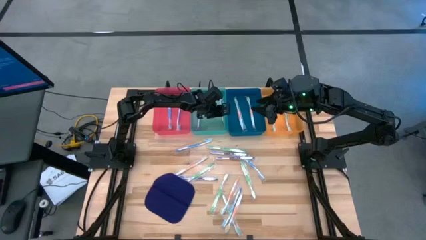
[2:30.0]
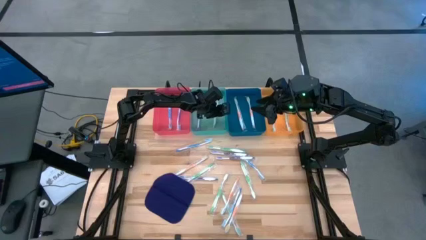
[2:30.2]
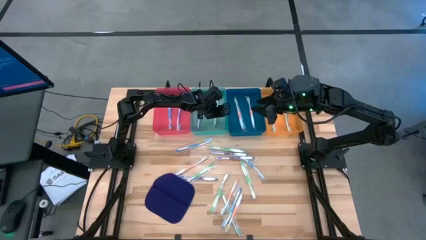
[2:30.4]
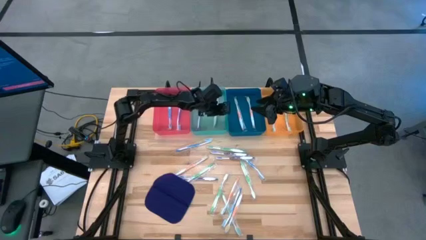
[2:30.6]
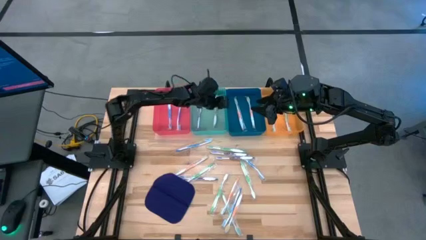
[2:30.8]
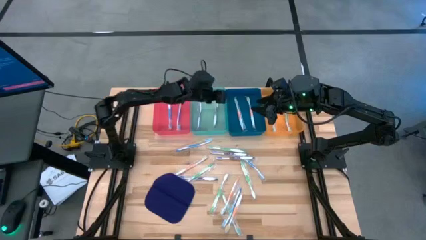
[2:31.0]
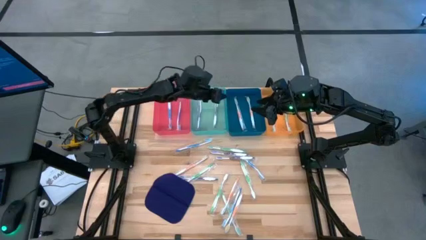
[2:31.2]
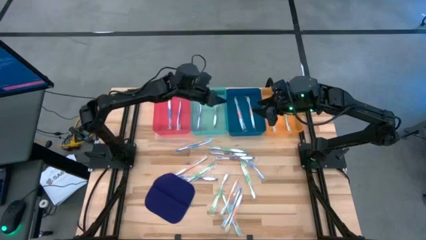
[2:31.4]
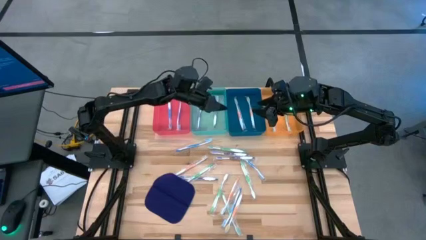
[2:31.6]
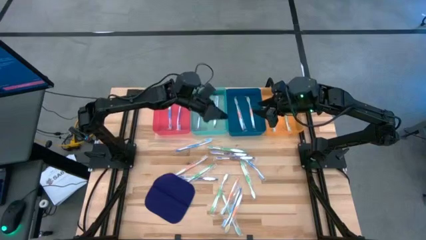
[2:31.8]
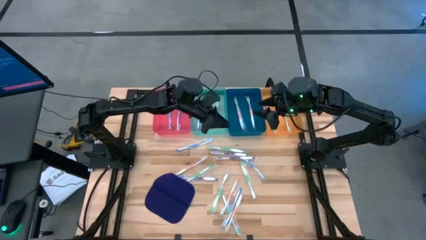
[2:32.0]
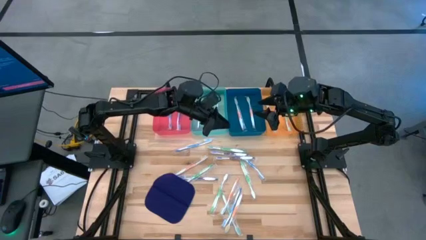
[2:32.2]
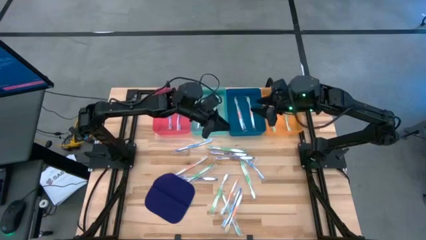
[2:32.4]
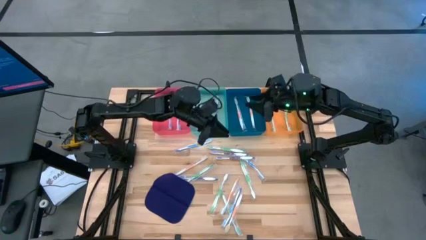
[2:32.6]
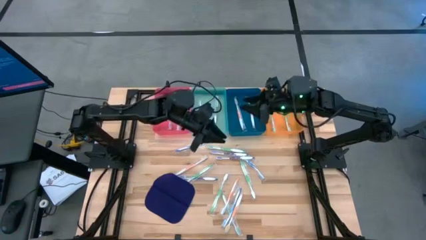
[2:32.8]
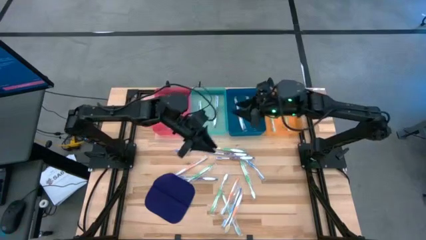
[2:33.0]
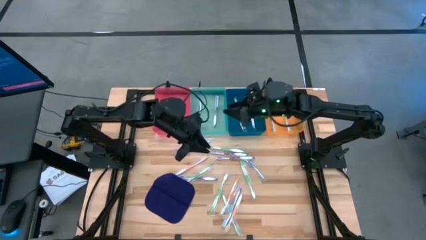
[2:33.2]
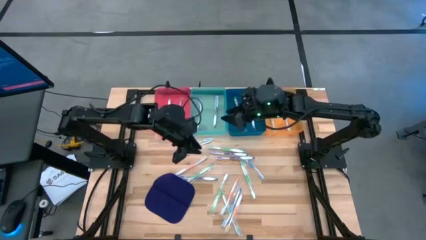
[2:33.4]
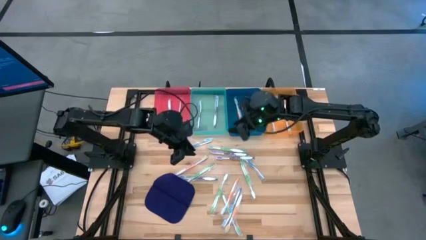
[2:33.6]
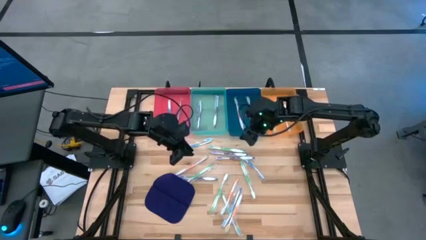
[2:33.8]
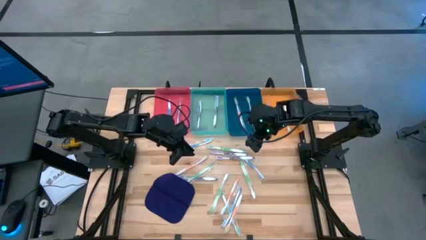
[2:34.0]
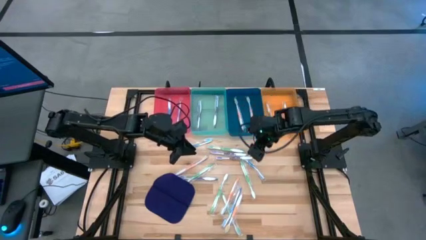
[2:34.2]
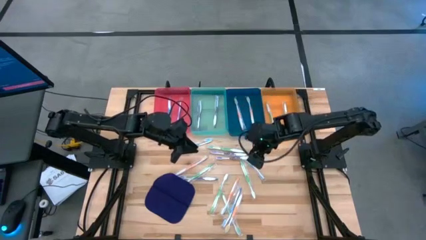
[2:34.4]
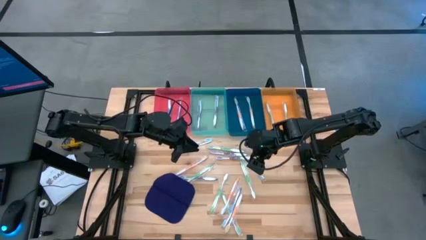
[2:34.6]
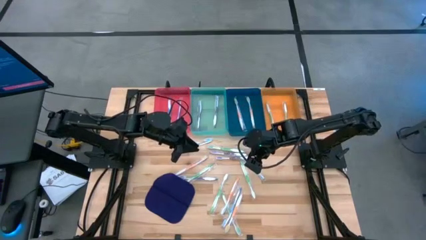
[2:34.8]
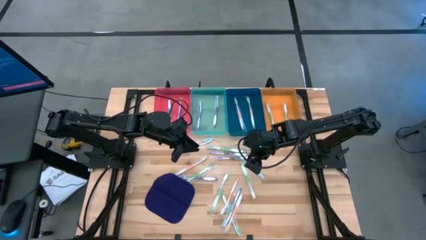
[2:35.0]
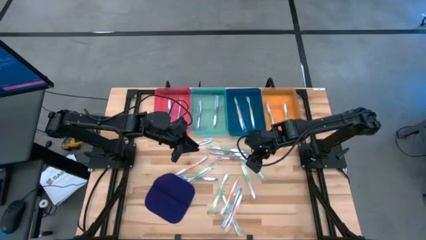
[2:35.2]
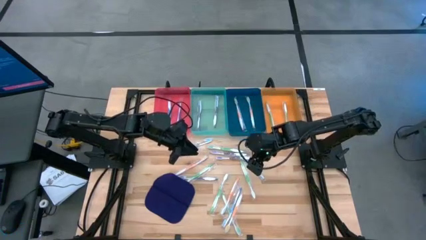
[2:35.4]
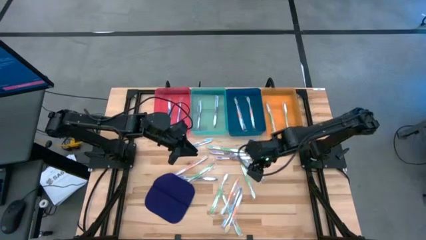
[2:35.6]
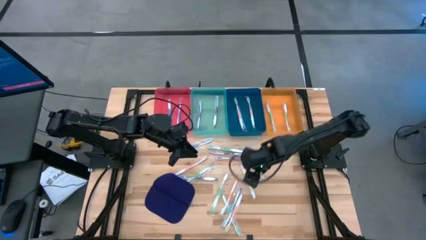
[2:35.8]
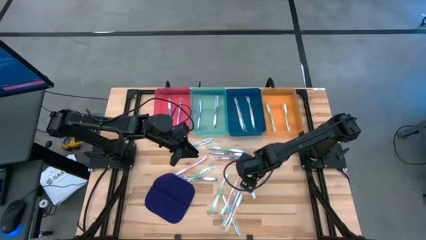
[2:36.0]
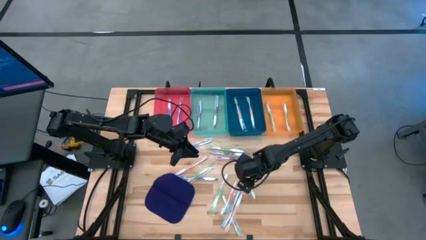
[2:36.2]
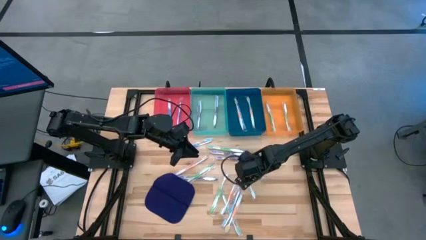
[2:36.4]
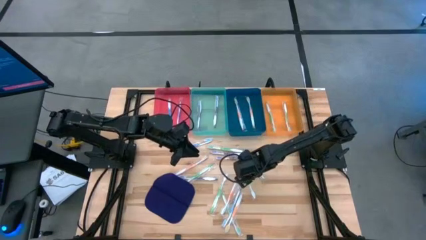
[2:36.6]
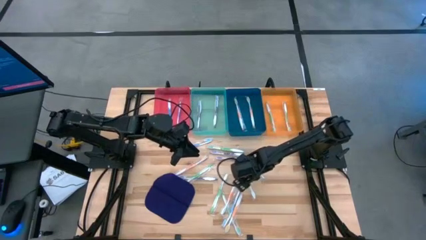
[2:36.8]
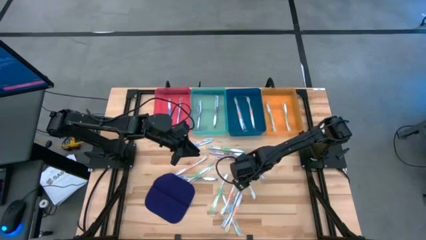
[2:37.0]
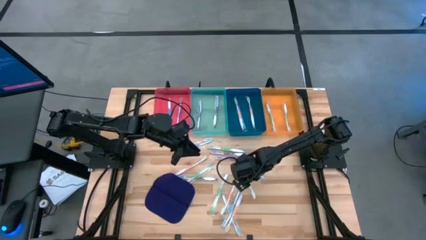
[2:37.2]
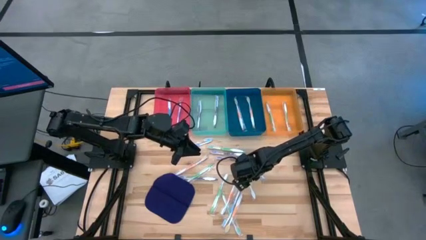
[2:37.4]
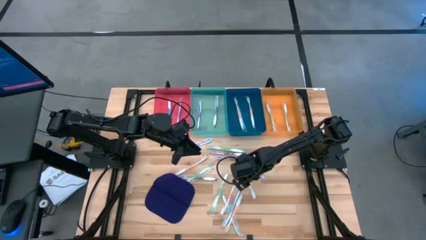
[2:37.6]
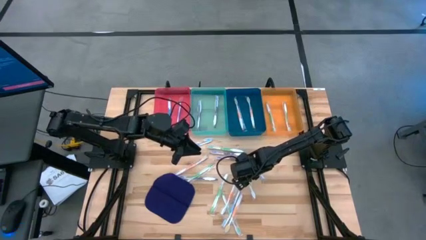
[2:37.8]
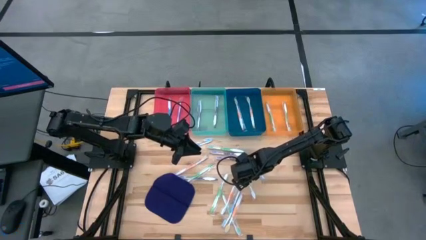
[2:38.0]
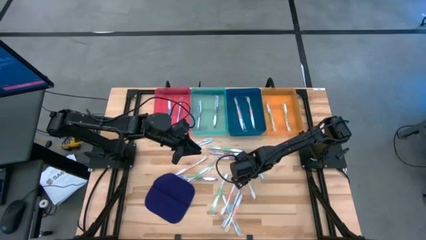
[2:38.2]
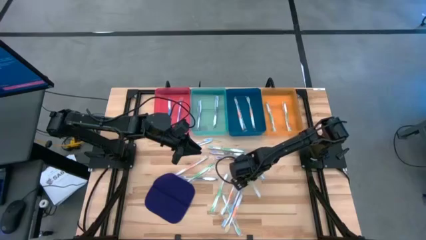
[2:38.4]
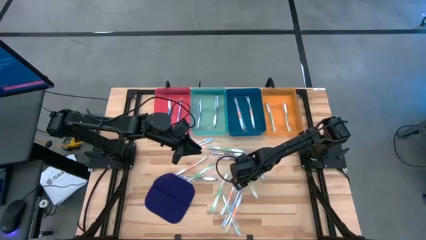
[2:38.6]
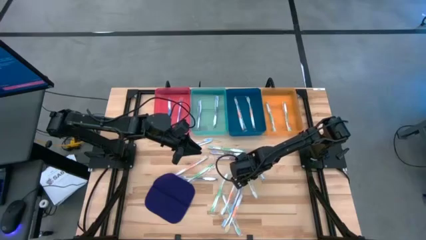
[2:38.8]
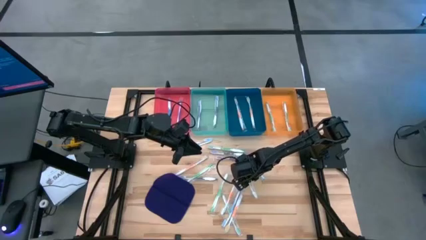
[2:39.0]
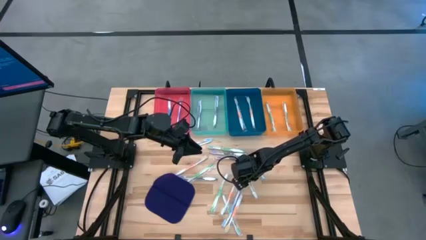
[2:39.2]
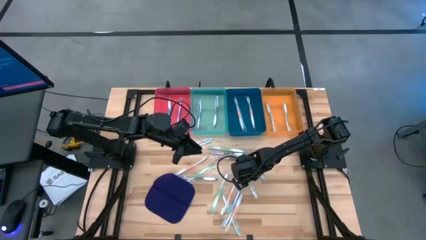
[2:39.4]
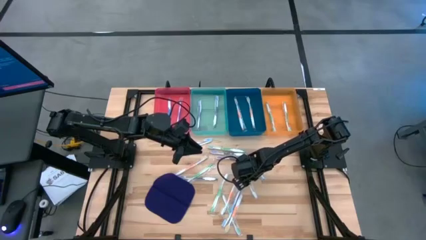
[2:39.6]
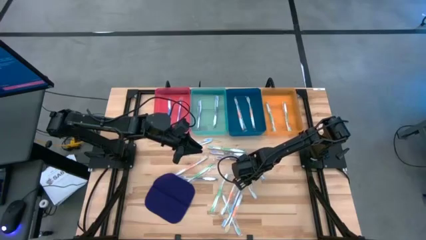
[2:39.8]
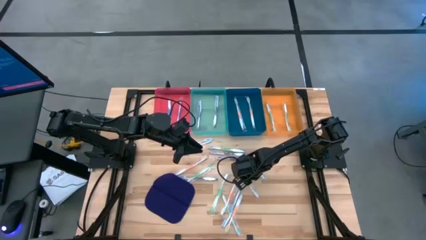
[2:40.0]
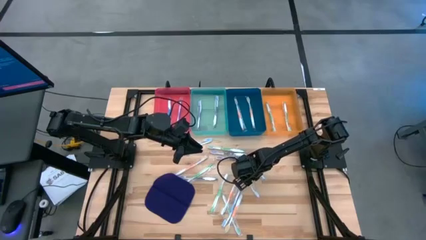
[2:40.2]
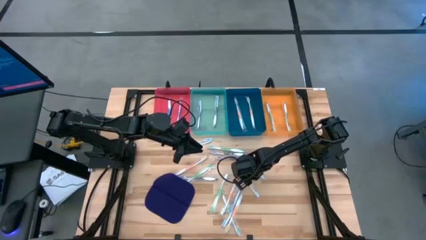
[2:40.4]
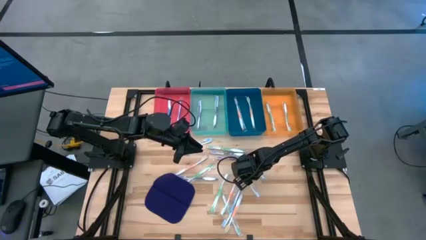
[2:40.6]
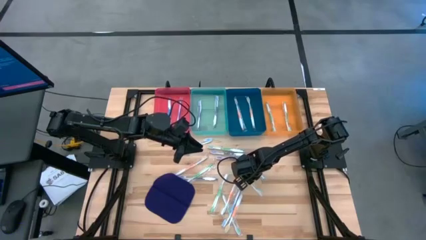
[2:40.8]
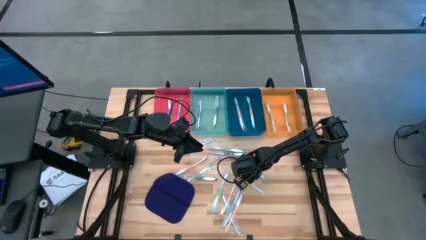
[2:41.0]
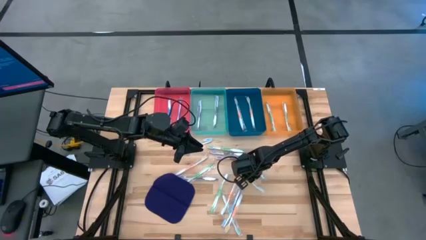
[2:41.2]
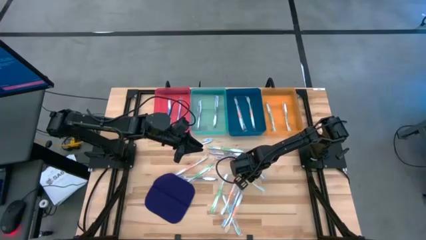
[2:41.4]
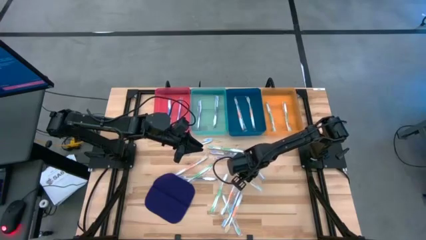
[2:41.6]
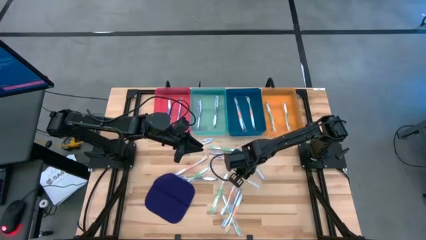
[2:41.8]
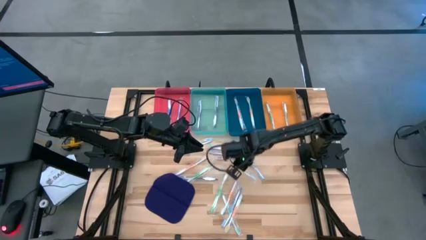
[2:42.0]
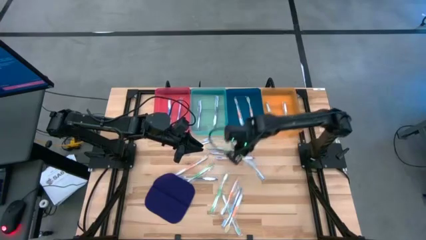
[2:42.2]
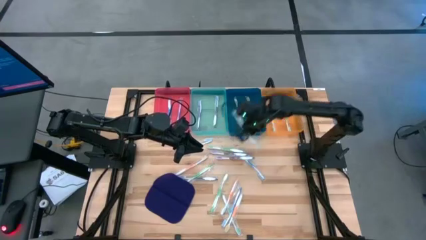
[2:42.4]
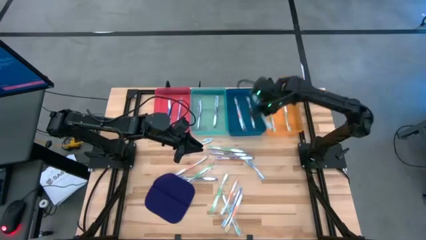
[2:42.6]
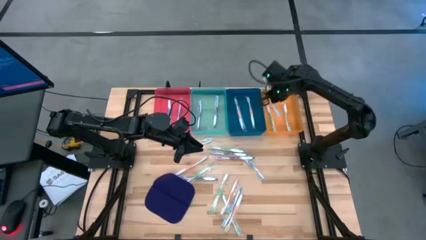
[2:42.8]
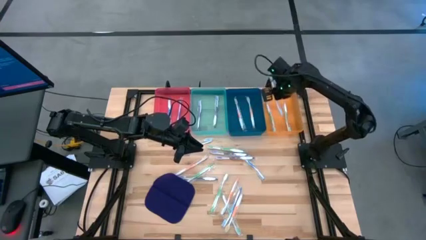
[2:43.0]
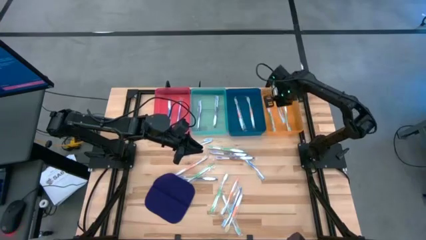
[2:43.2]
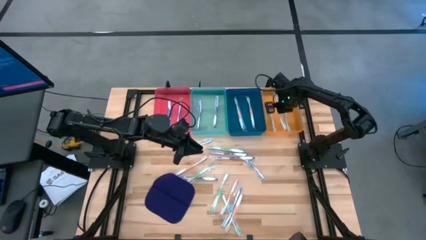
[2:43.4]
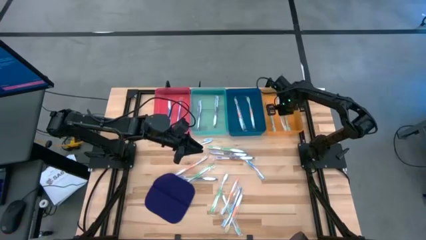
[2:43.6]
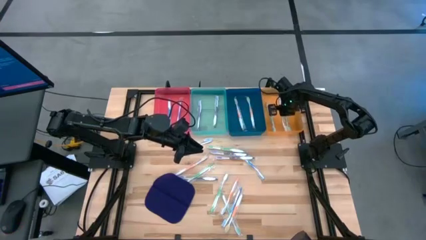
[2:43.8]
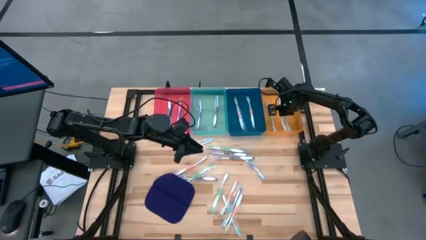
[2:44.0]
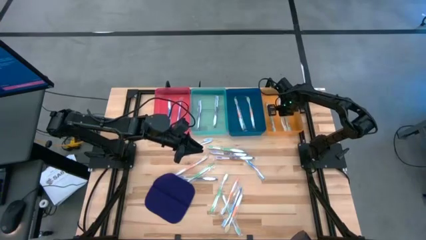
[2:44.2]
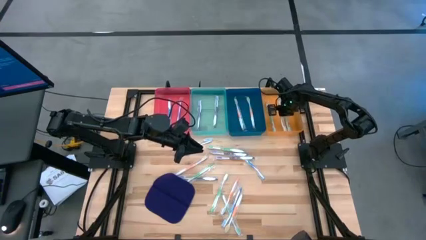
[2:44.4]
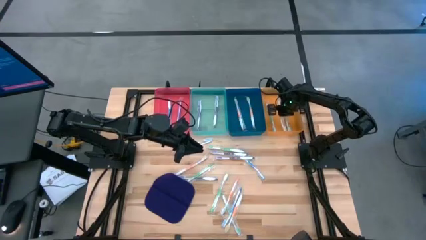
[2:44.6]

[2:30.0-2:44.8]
Task: Pick & Place Toothbrushes
Put the green toothbrush into the orange bin

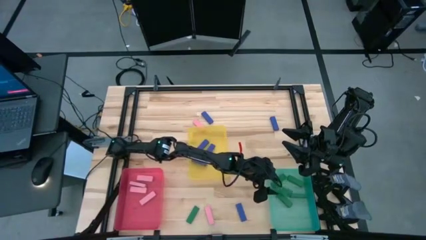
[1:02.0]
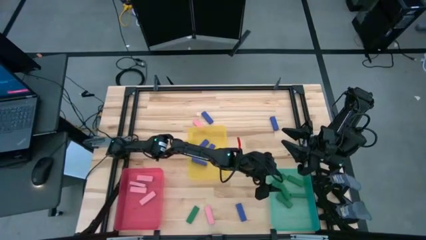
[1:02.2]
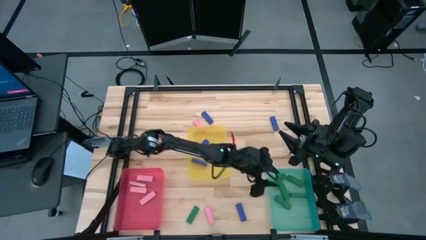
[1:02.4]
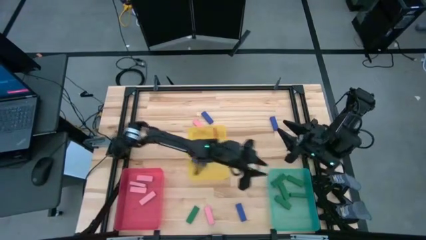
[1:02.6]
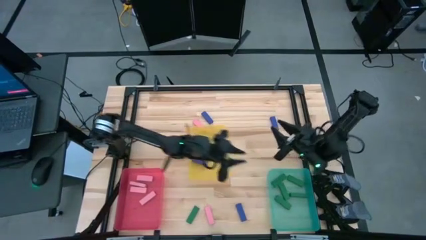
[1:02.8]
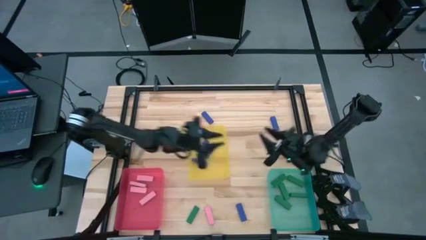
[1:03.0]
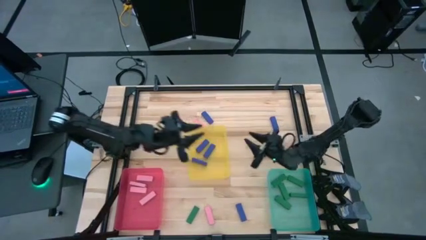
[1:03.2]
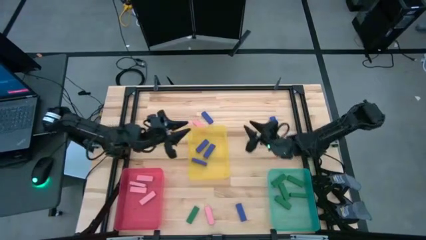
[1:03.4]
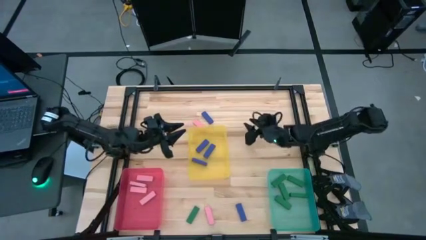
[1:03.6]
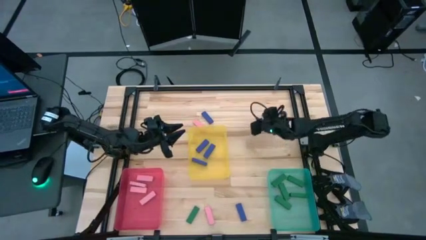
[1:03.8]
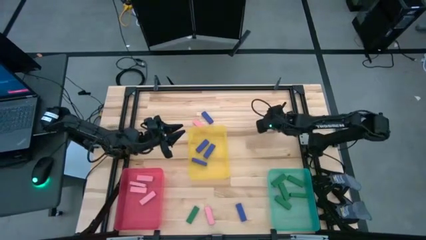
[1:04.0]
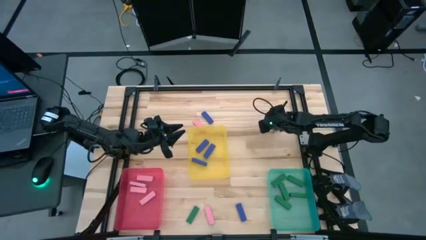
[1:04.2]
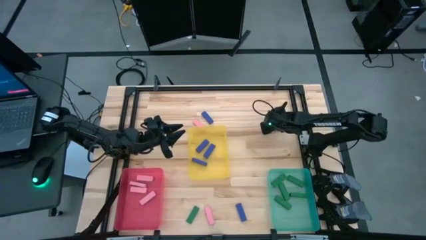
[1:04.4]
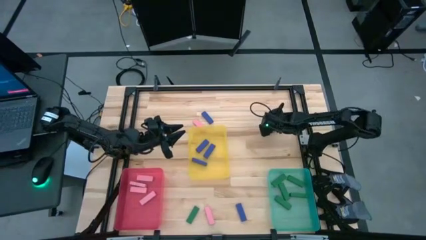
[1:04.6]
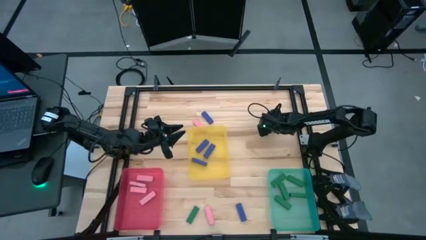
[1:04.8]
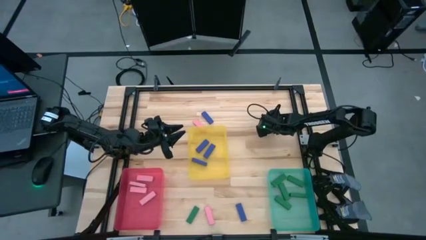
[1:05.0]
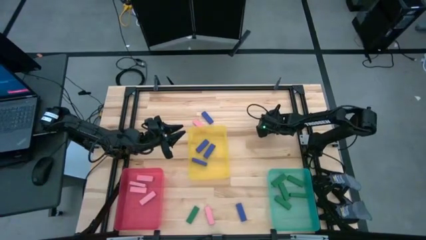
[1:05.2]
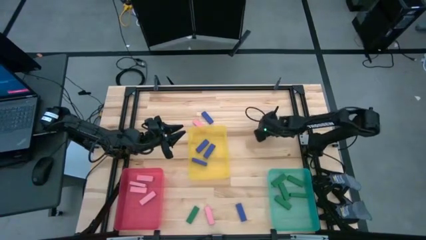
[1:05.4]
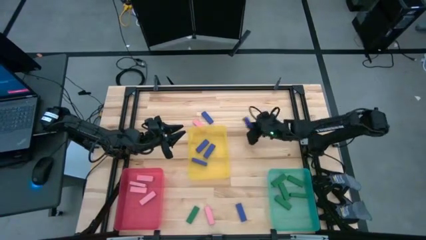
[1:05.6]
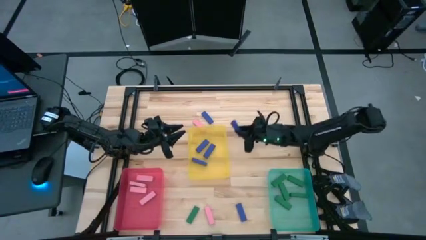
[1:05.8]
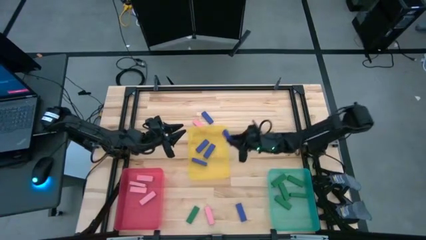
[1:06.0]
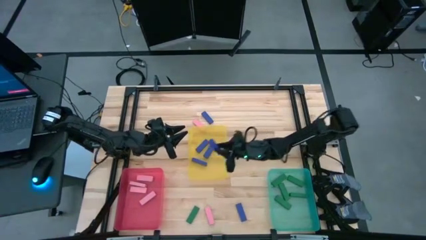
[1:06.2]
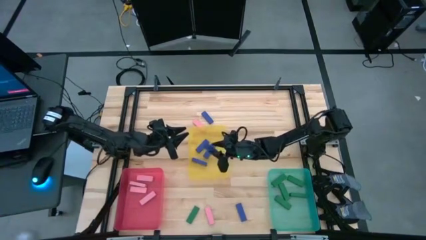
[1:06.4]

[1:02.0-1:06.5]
Task: Sort blocks
Put the top right blue block into the yellow bin
